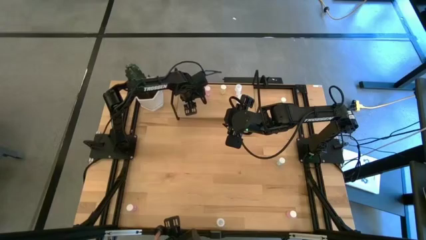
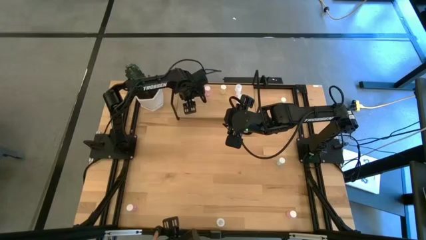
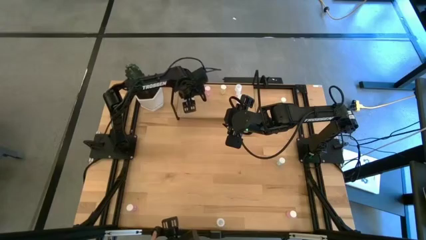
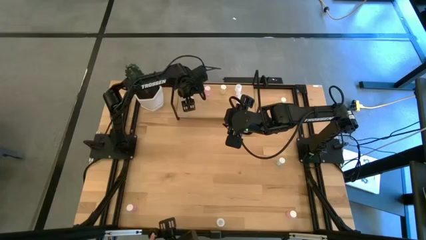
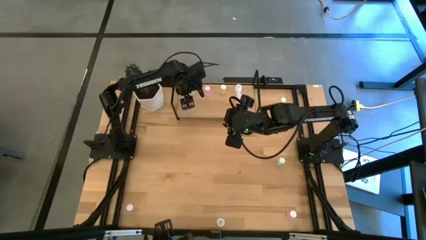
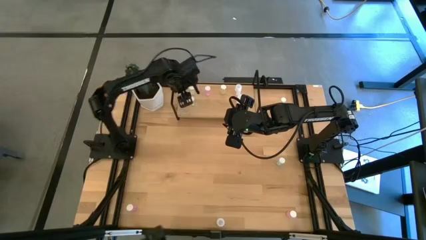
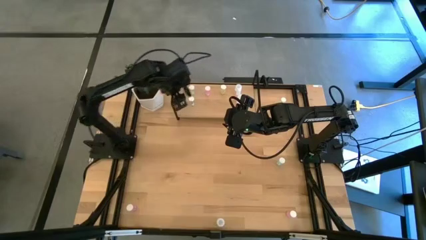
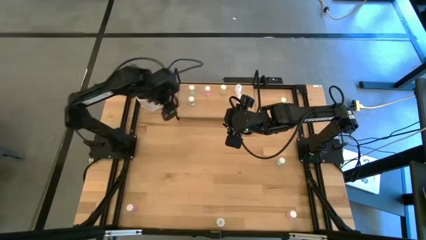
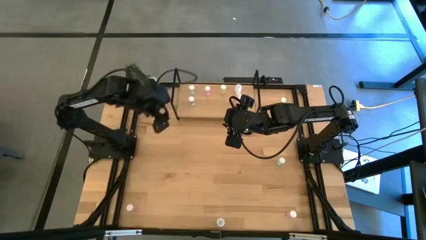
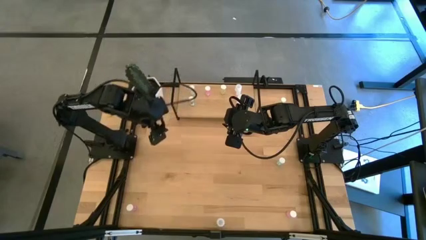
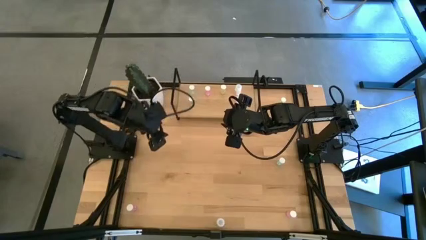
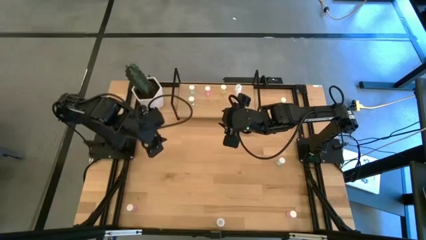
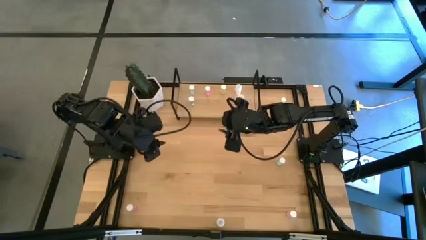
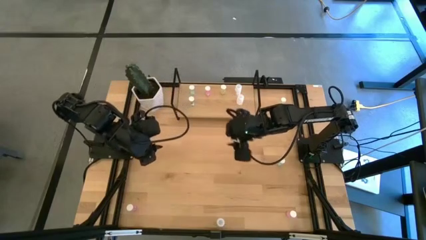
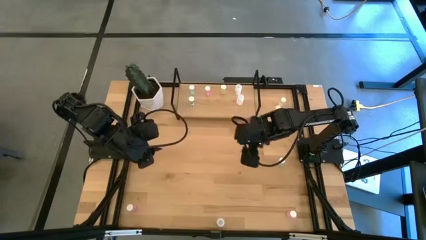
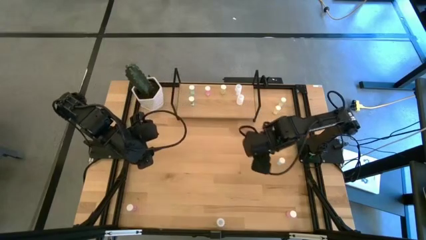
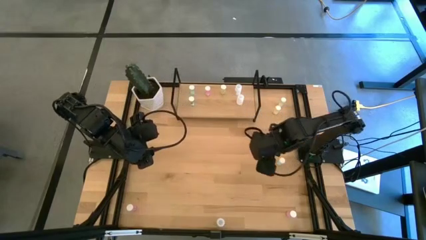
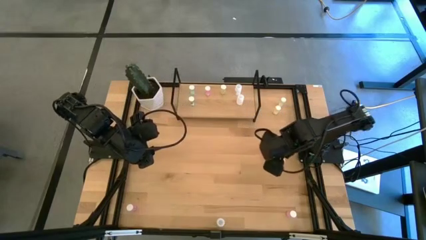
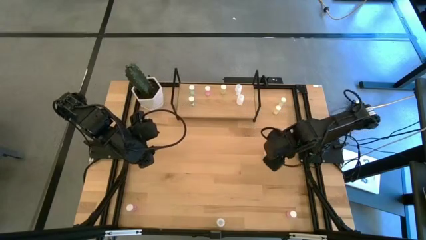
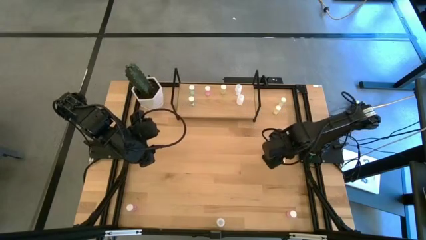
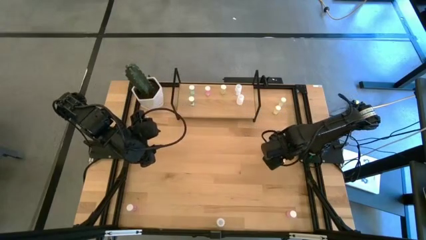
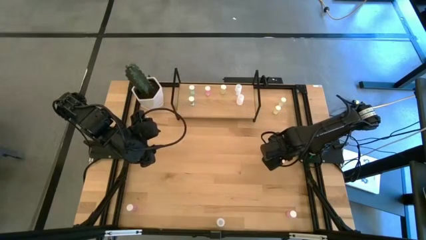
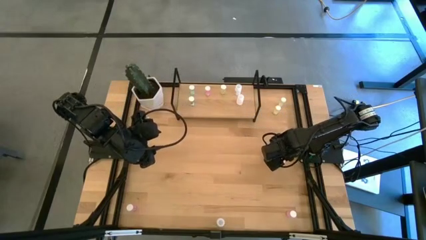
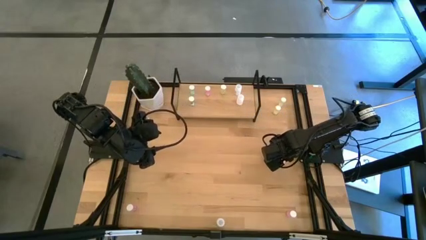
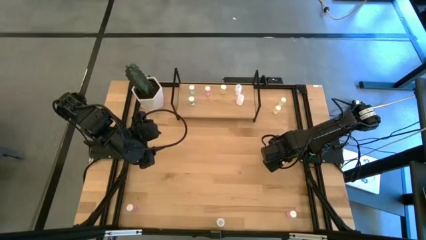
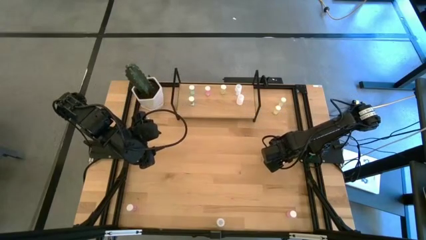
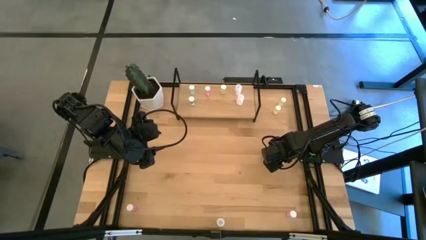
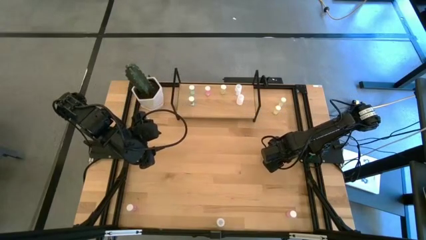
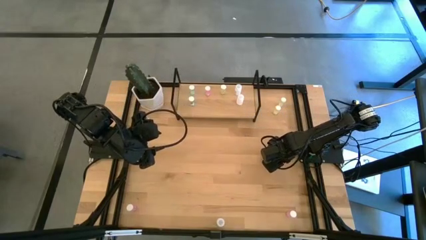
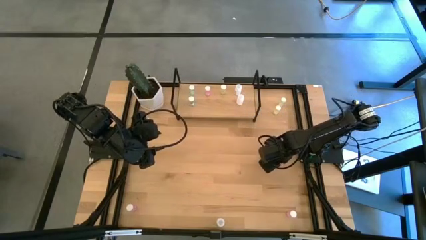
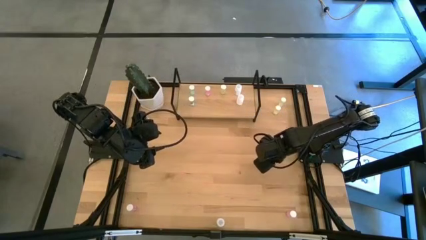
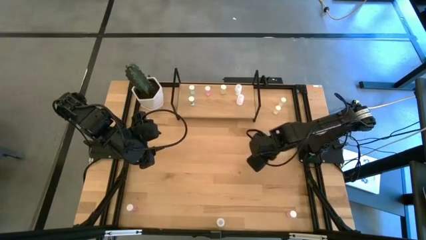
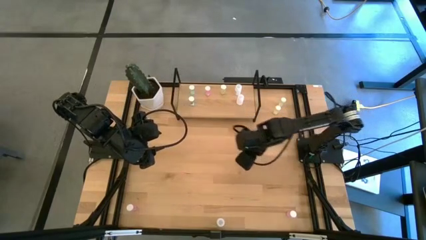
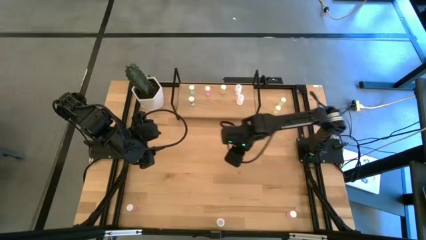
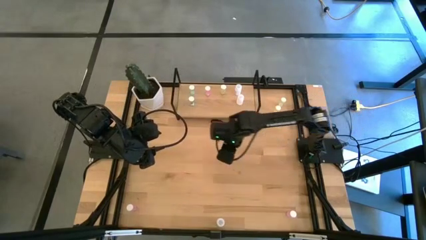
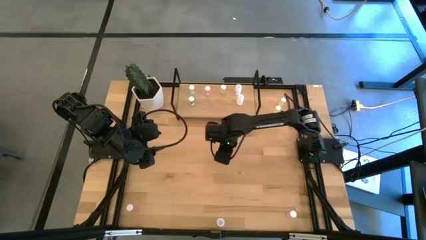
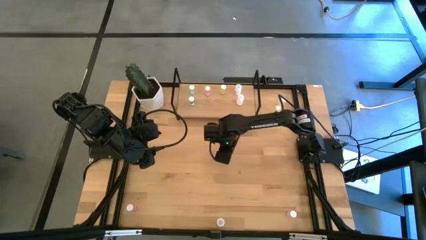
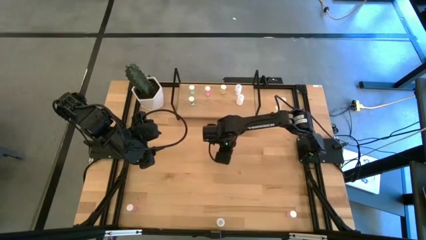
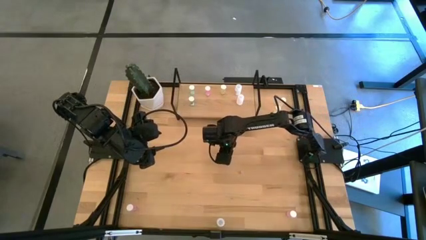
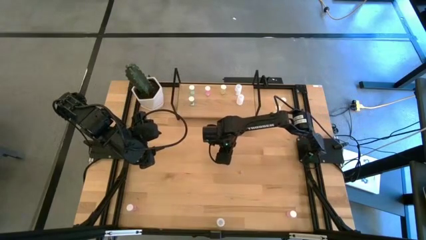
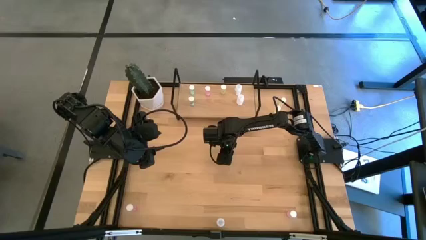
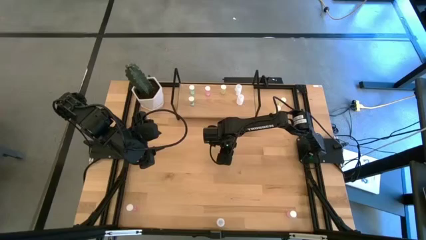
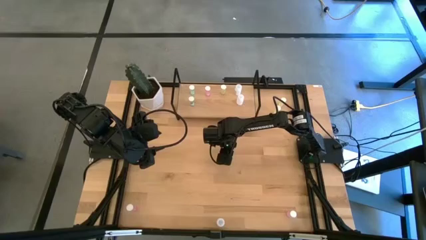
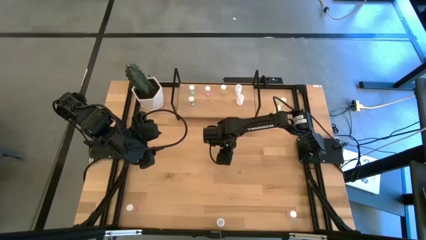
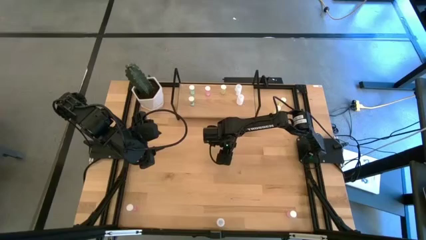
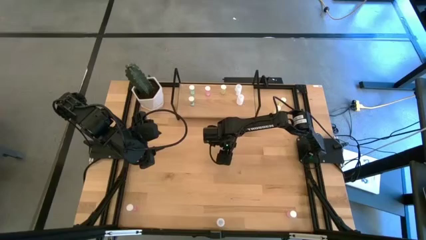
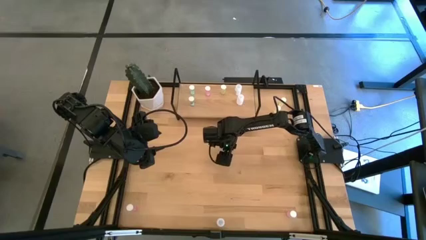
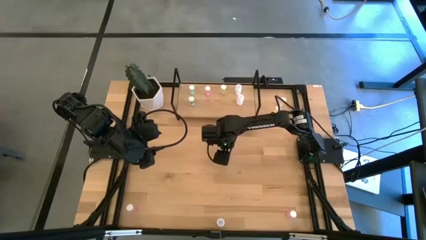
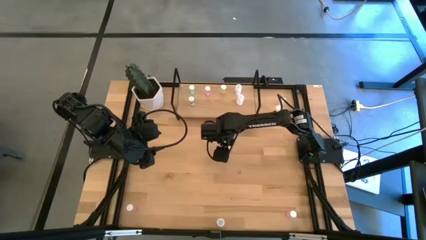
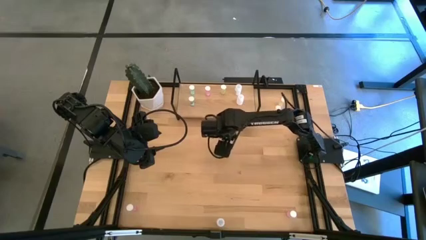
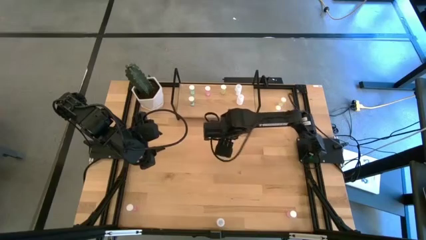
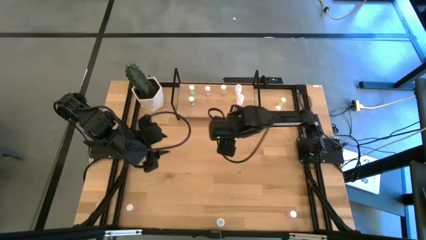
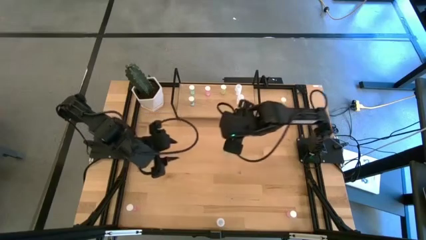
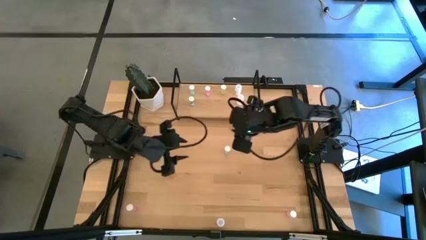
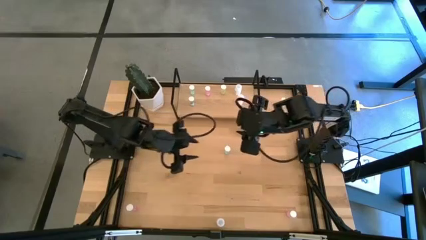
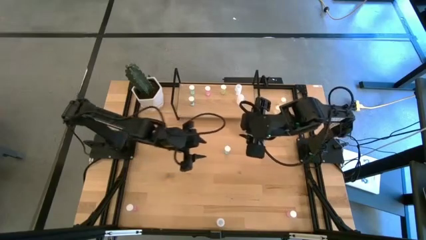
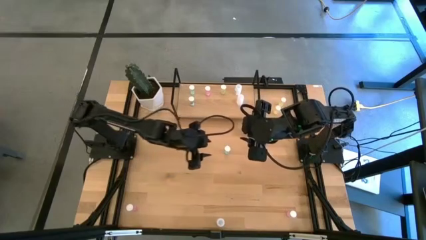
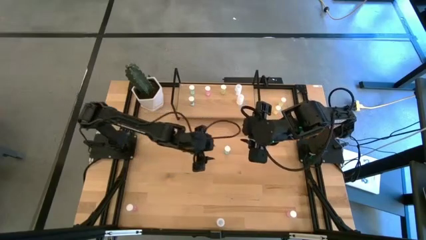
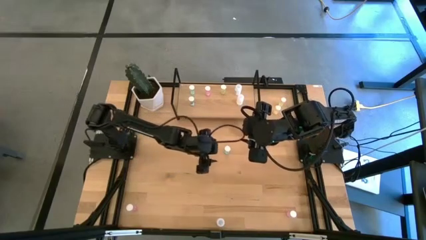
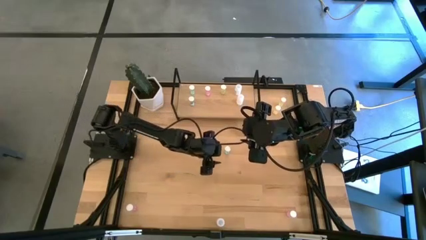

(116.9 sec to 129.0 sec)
Task: Pick and place medicine bottles onto shelf by color
Put the blue pill bottle on the shelf aligned with the other blue pill bottle

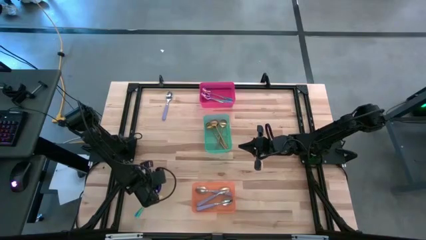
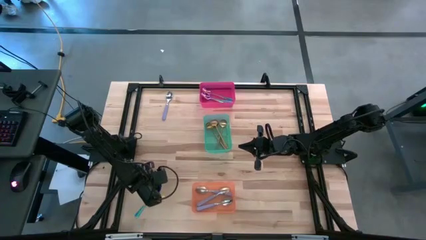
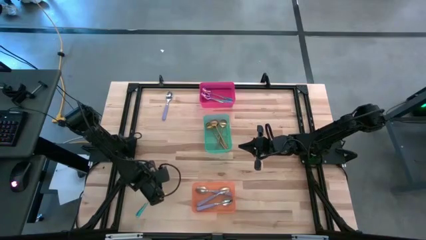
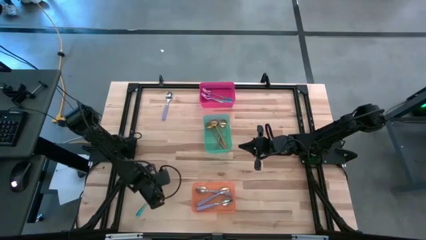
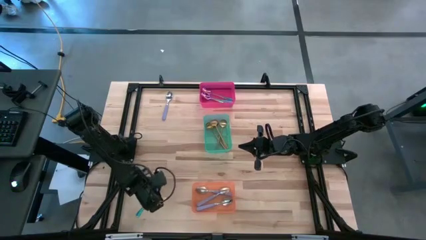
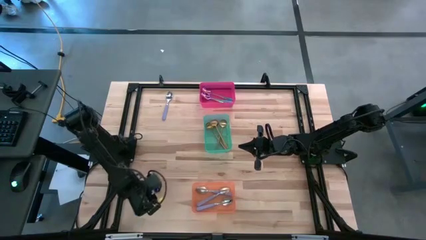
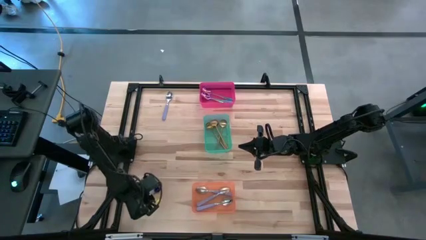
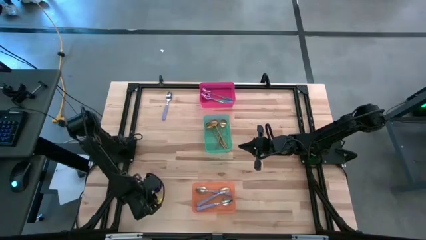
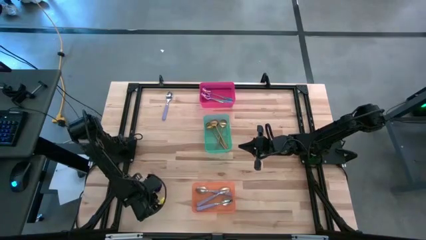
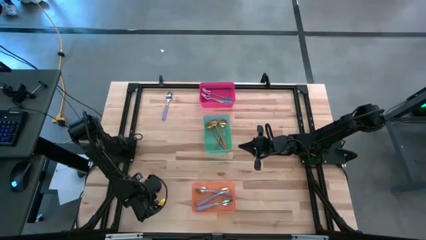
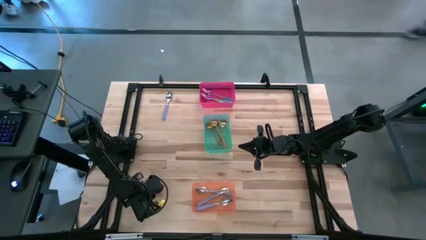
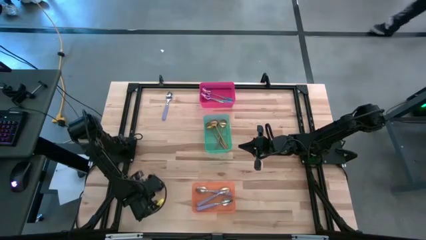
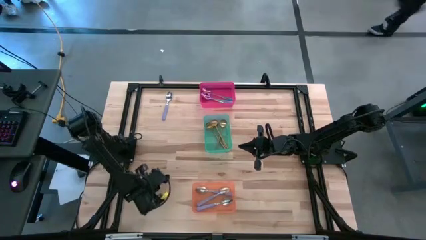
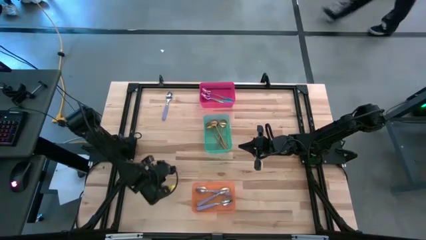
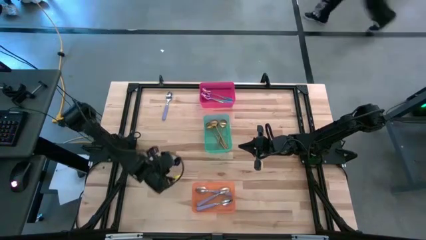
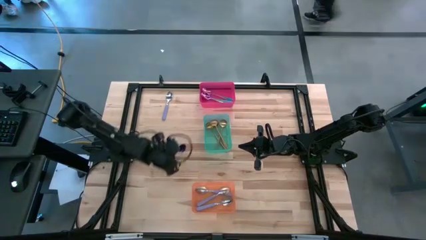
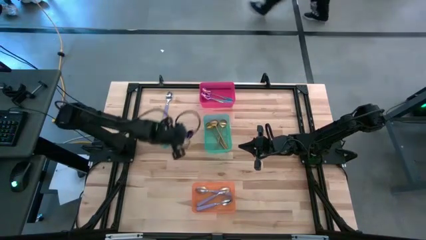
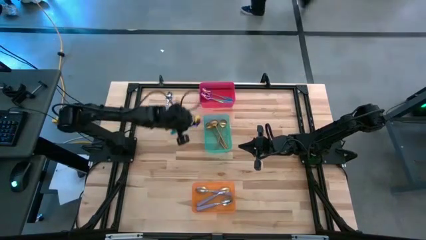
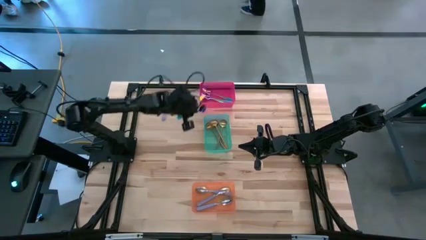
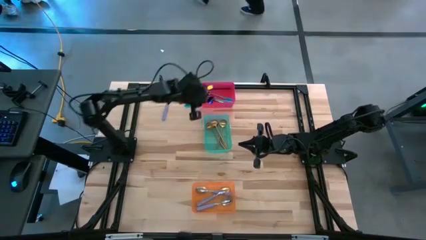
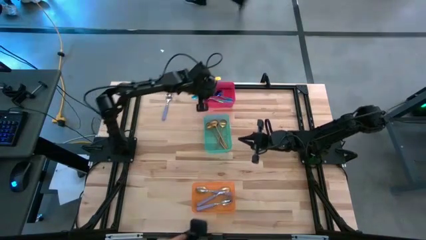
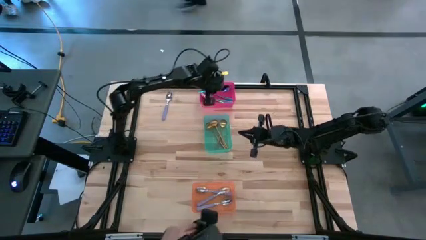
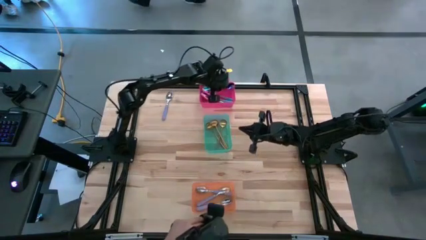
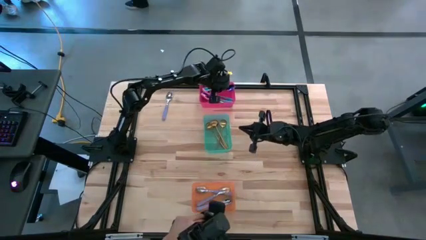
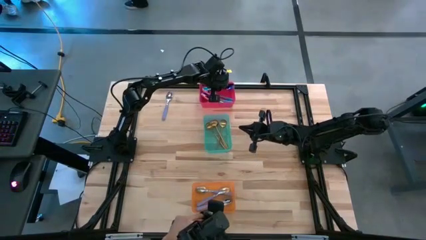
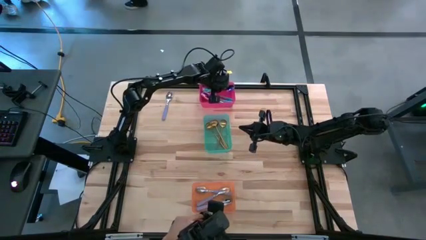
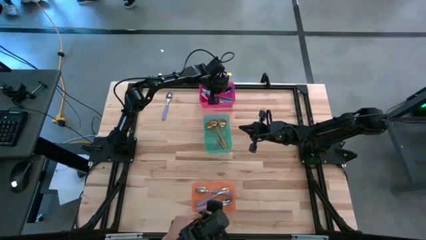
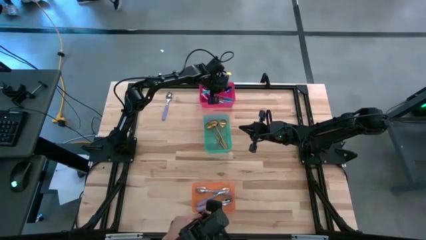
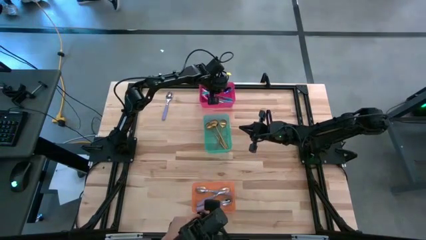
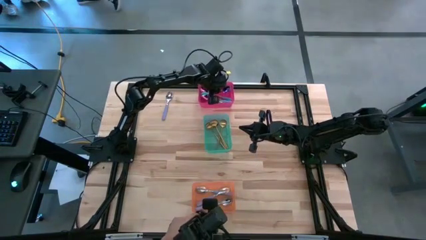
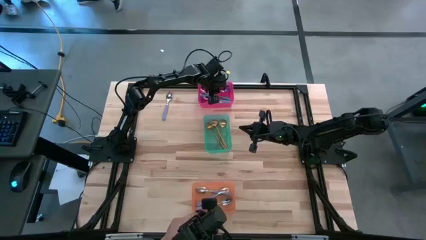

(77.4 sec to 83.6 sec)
Task: Sort silverware by color (type)
Put the blue spoon into the red bin
